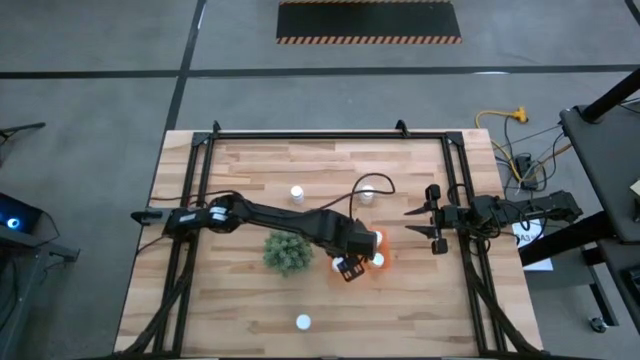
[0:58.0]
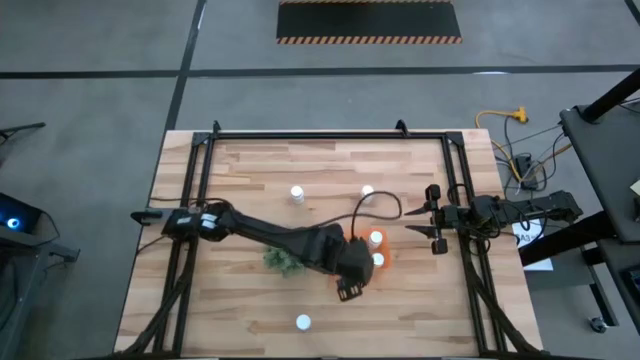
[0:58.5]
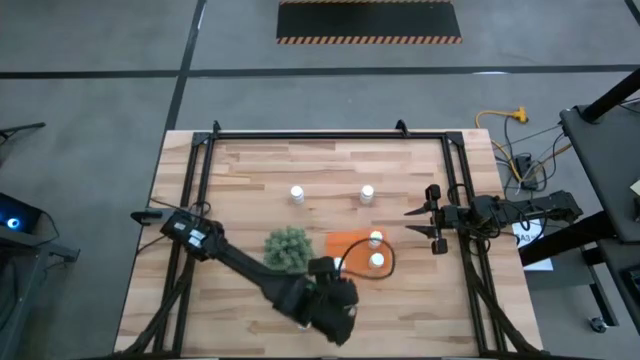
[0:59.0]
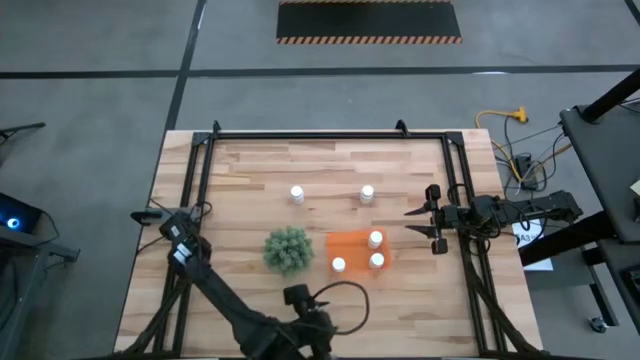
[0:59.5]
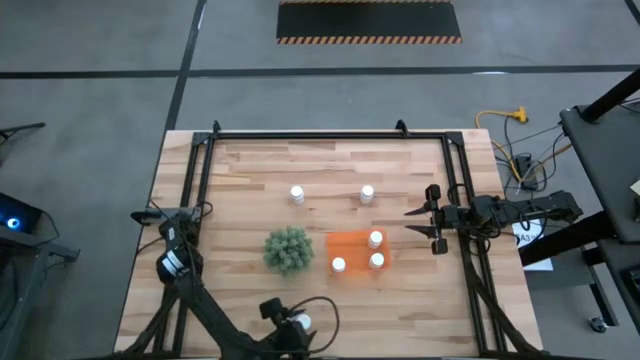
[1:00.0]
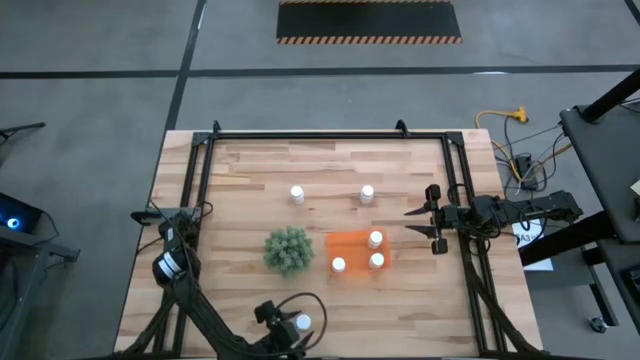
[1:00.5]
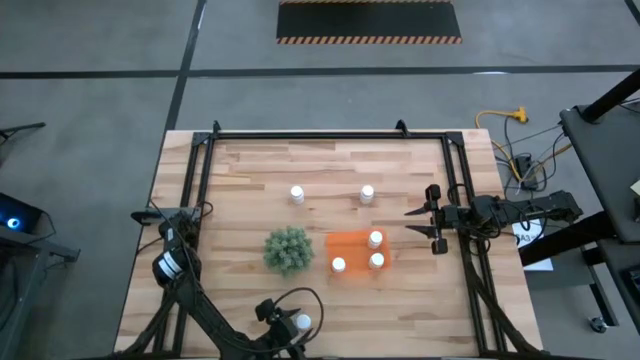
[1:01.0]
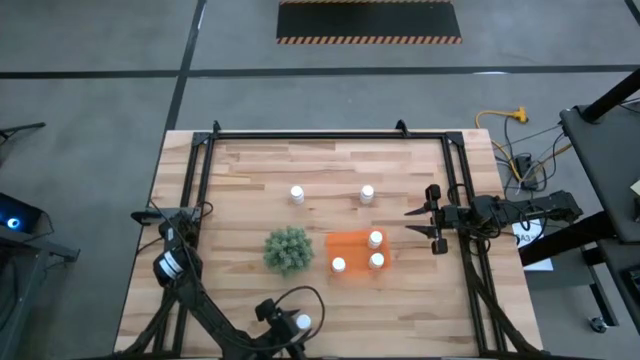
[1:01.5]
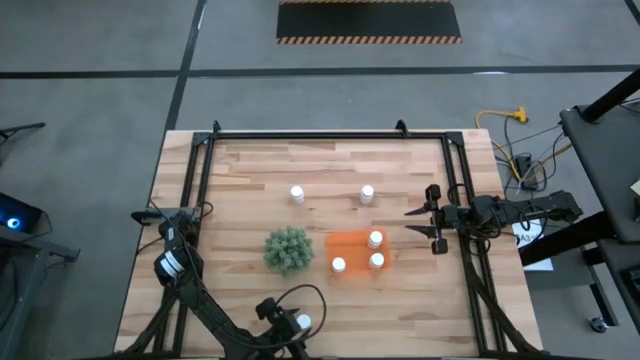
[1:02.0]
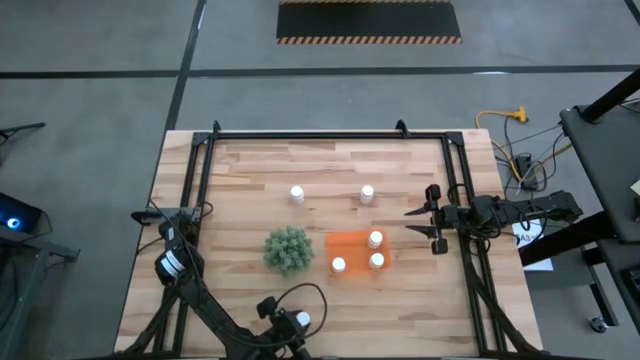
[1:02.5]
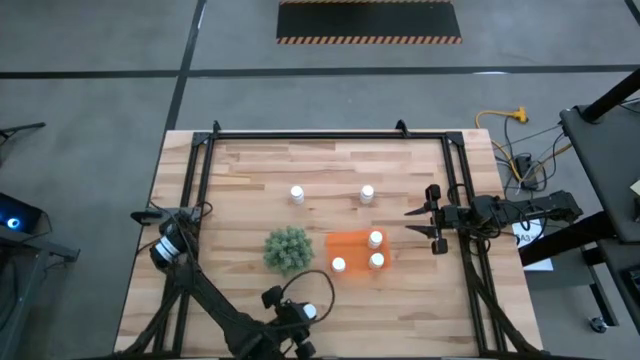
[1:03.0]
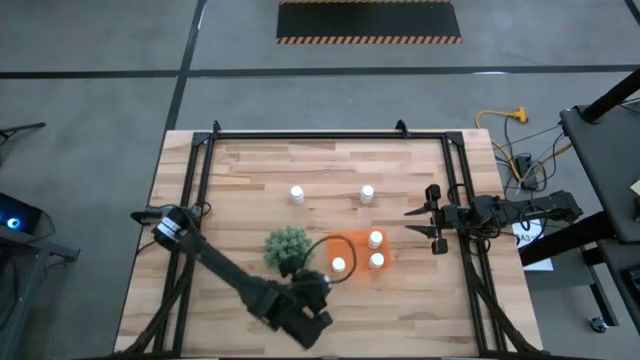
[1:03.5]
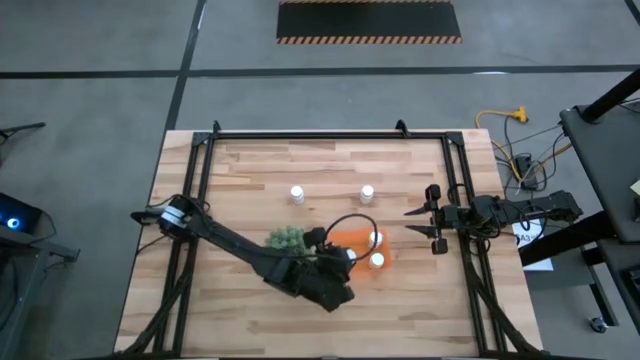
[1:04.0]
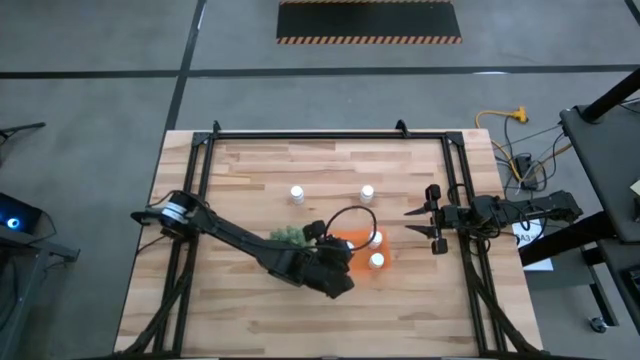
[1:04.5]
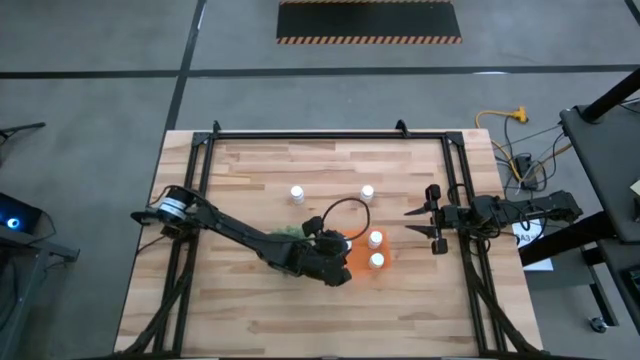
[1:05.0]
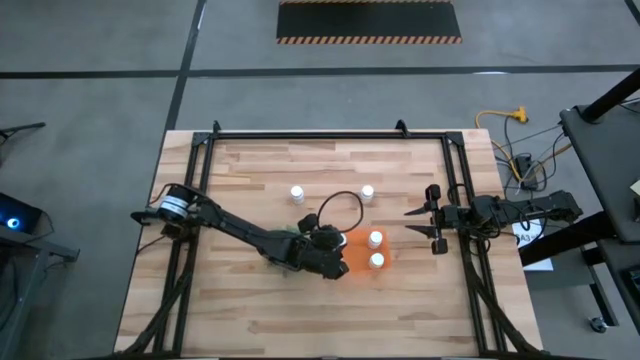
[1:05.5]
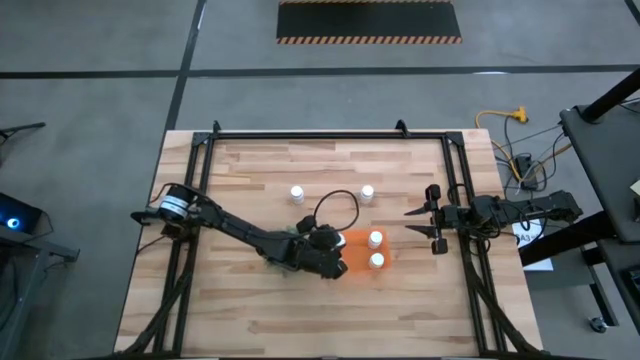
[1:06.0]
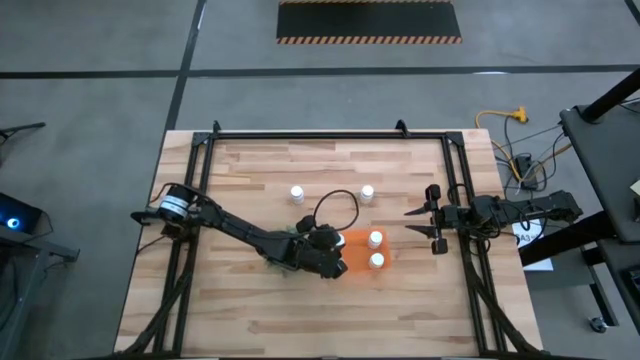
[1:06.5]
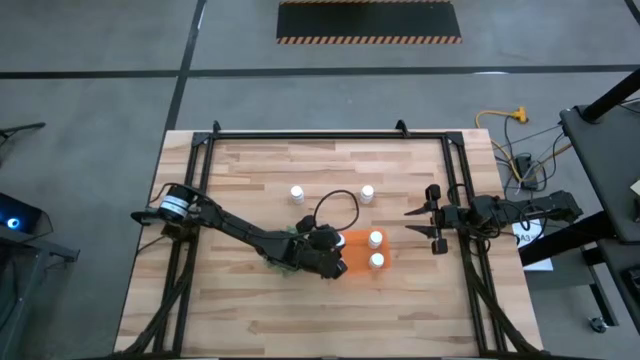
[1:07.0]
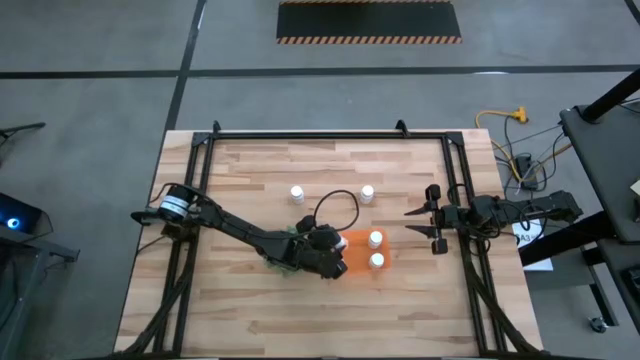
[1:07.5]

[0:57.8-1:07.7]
Task: Pick and place pill bottles into a basket
Put the white pill bottle into the orange bin

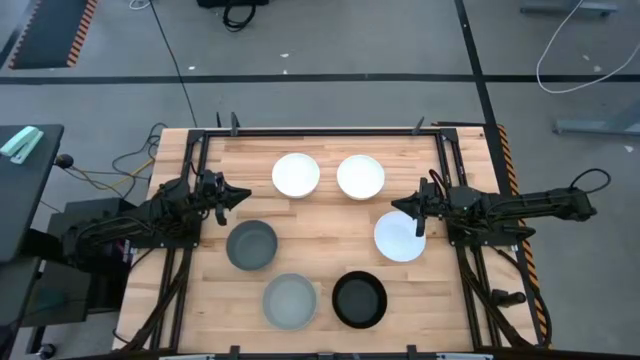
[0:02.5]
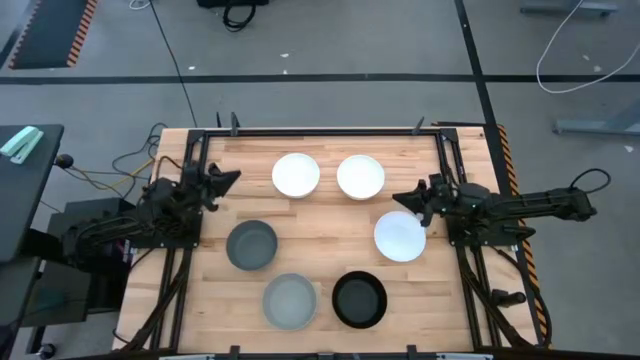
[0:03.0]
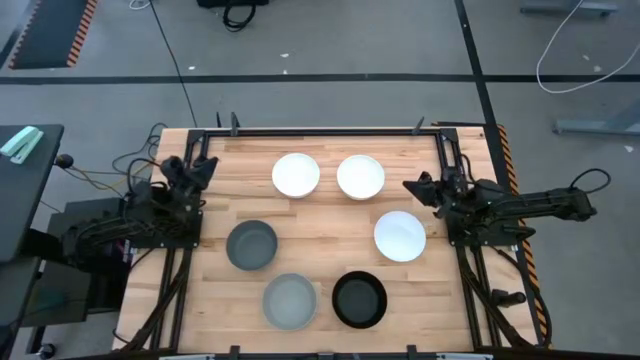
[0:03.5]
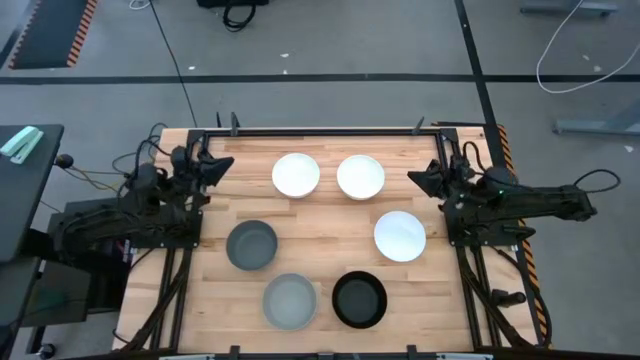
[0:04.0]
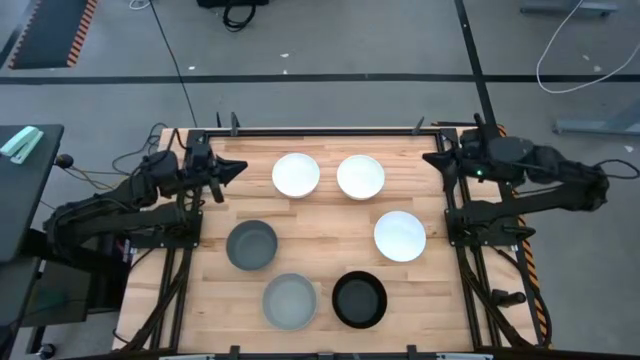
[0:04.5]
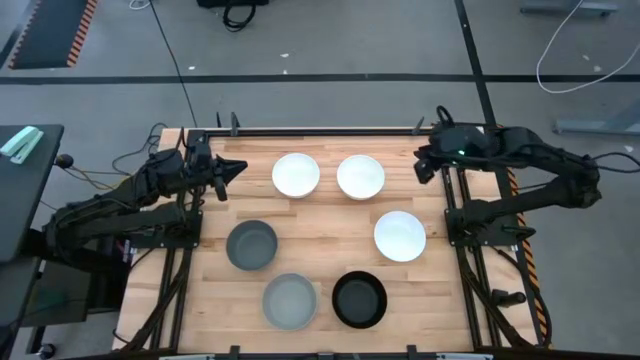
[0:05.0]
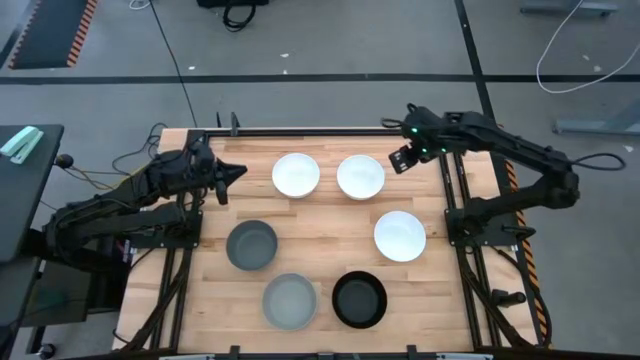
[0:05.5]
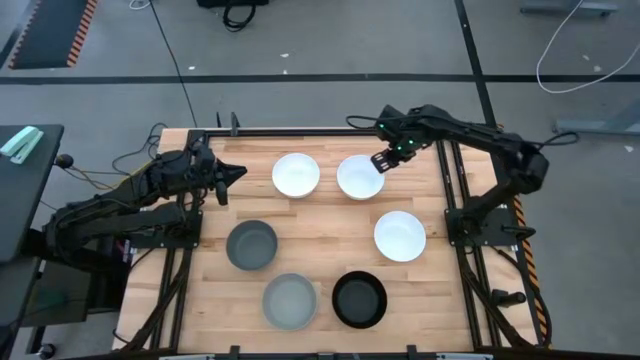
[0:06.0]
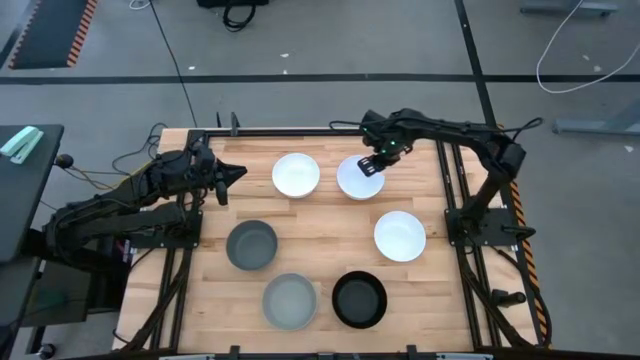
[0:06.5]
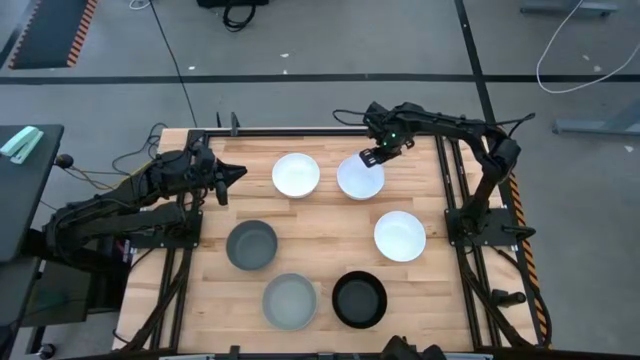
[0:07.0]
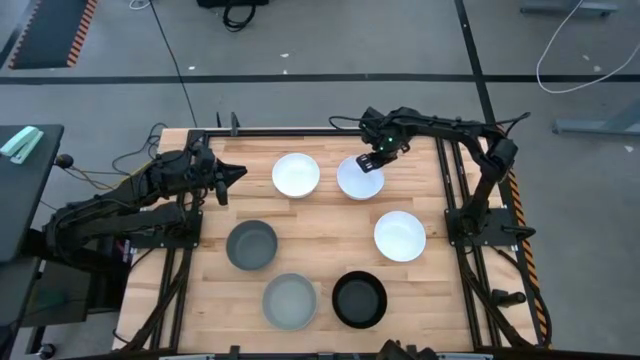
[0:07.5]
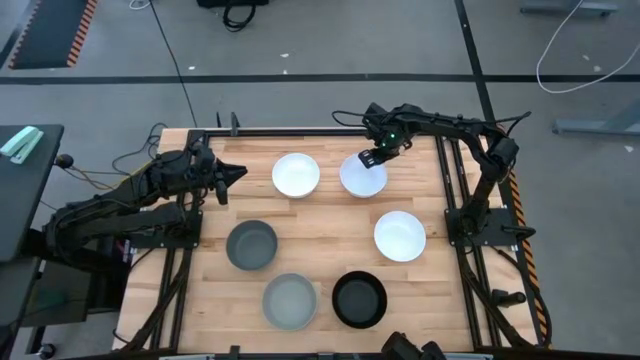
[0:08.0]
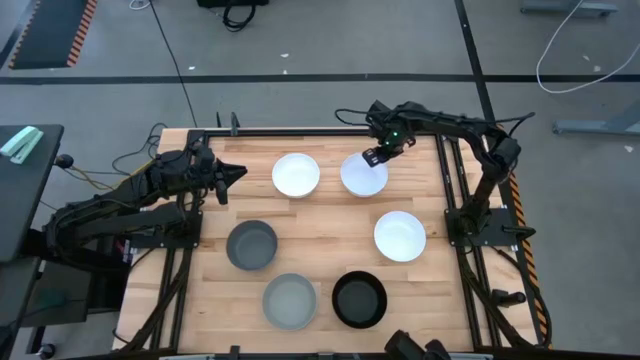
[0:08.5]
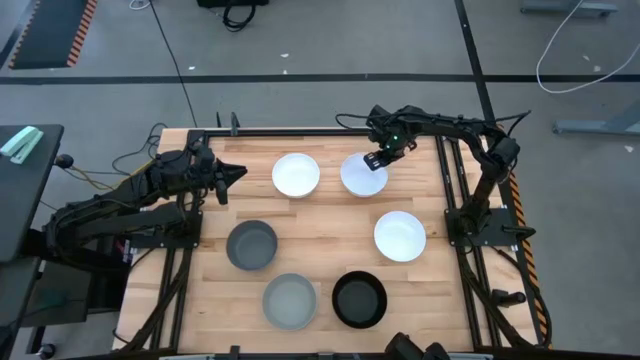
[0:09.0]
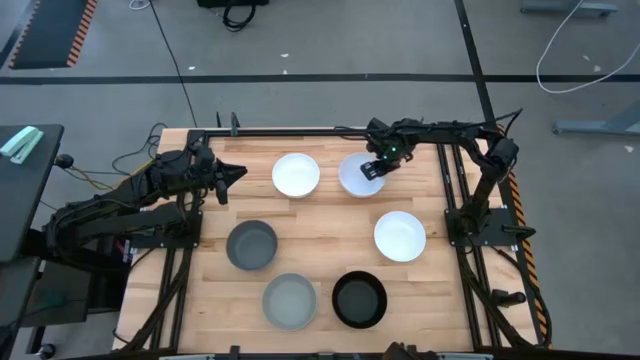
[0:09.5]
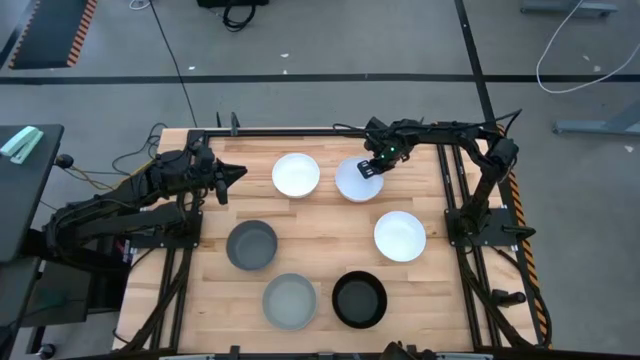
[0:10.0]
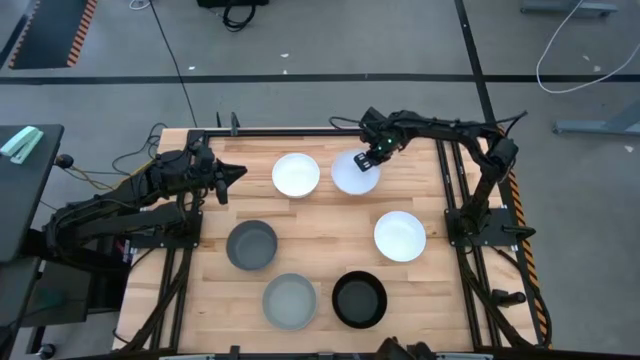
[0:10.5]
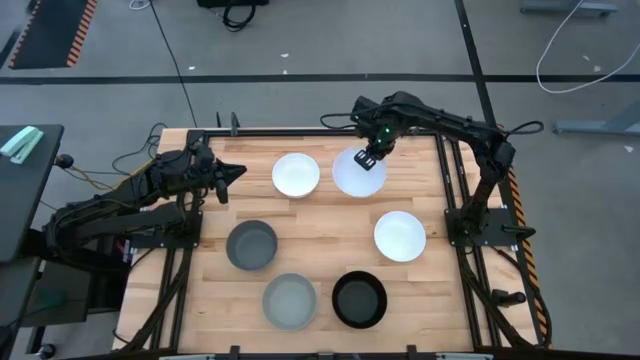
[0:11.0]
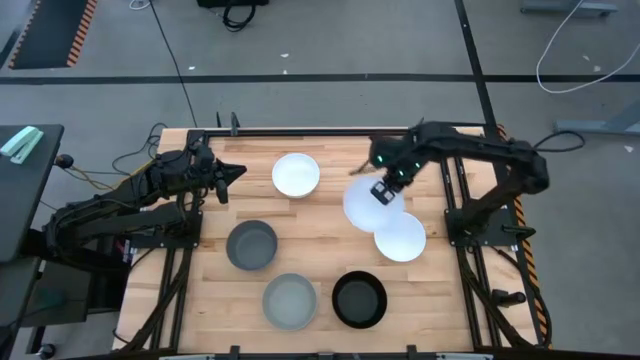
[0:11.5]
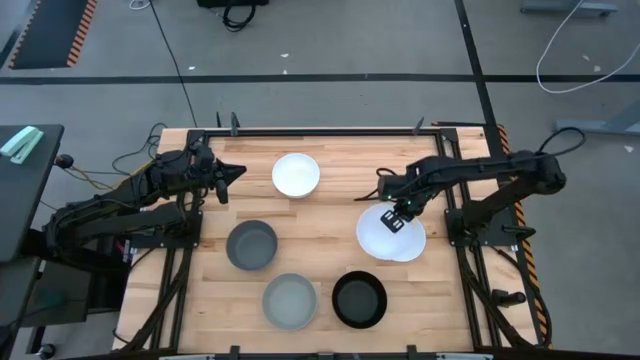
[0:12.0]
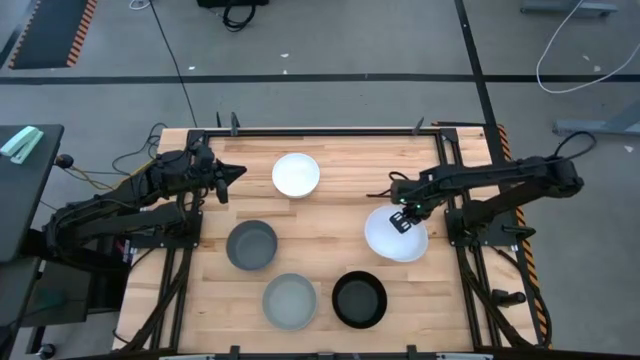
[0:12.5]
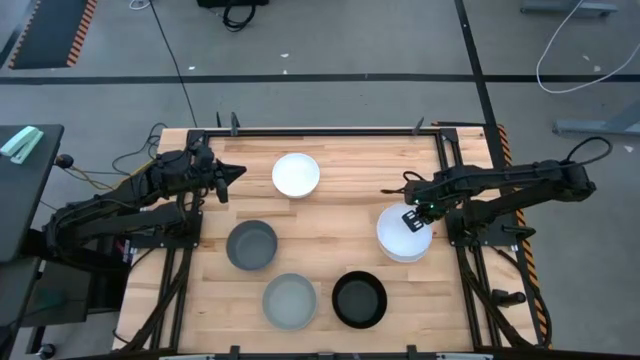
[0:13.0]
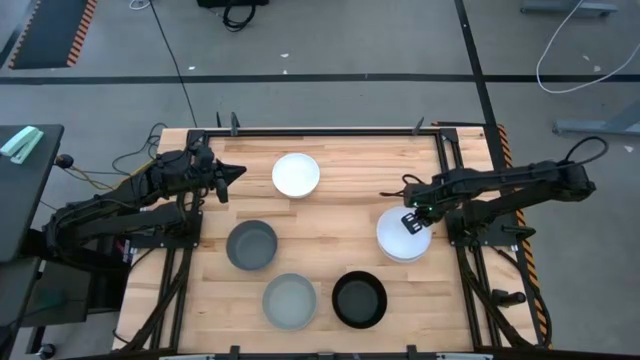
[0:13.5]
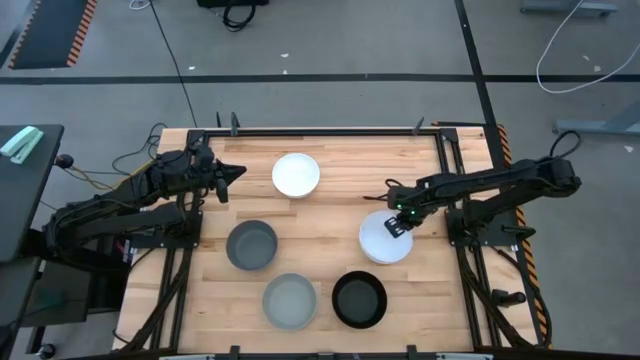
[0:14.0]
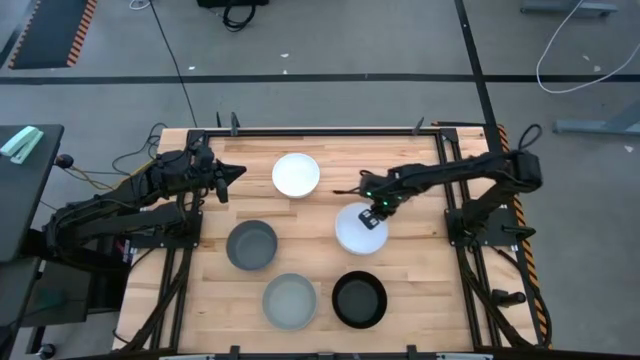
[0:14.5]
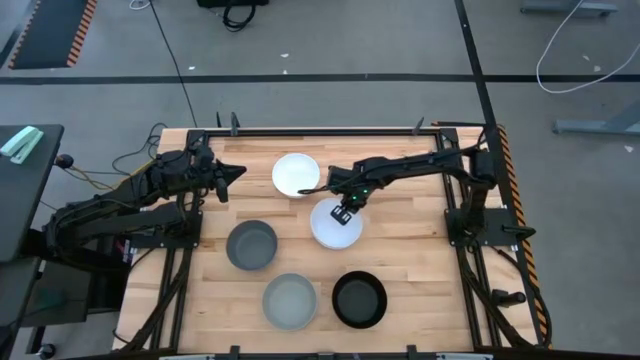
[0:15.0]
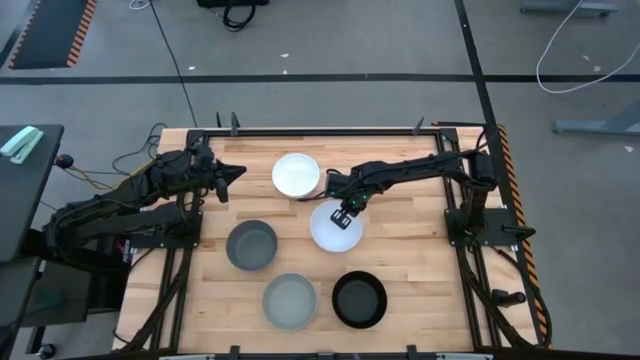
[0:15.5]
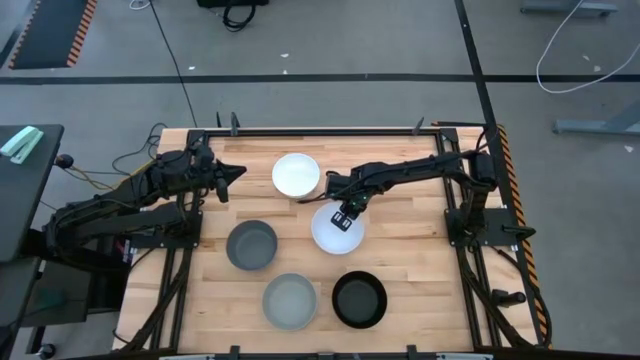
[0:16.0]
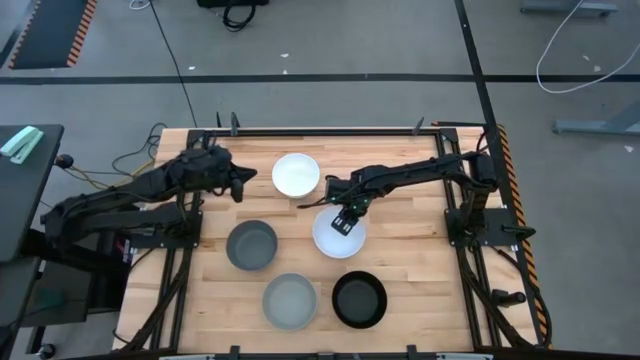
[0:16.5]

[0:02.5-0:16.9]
Task: Nest bowls inside each other
Stack the top right white bowl on top of the bottom white bowl
